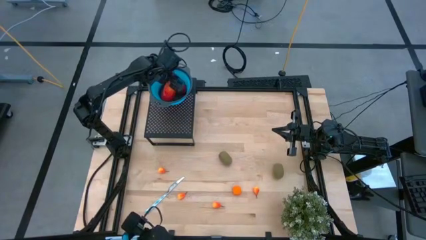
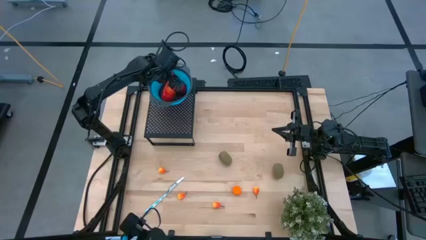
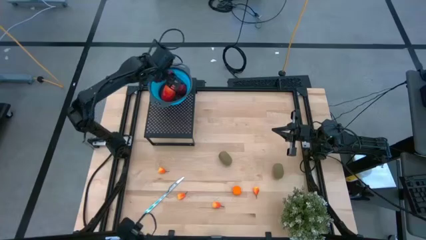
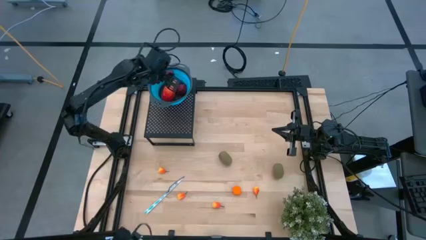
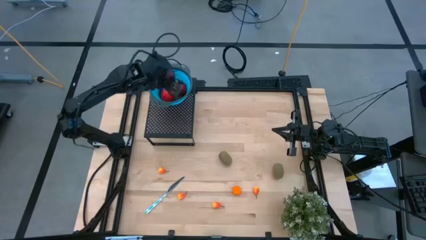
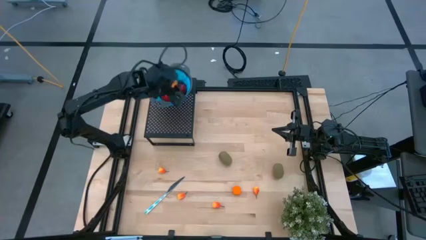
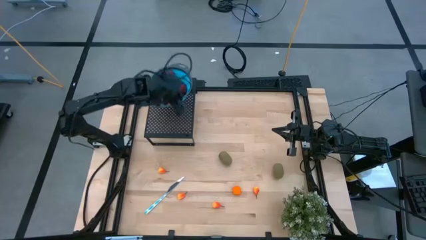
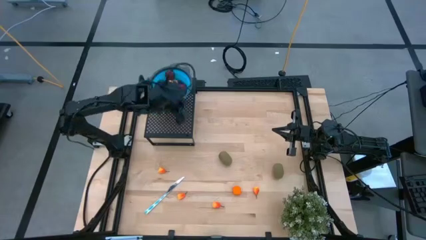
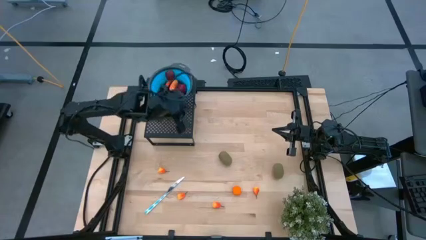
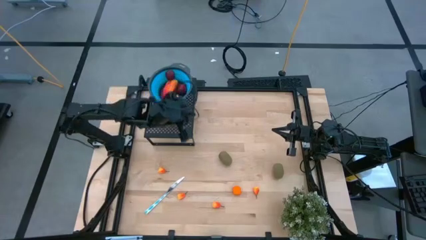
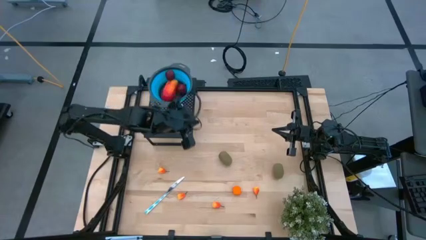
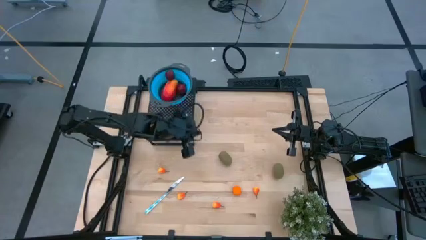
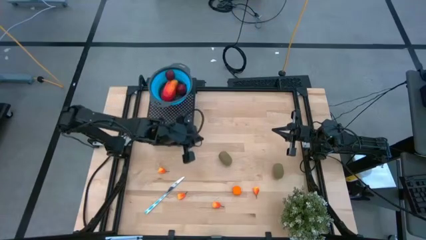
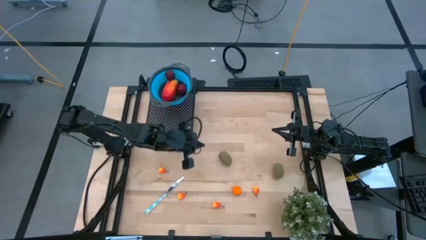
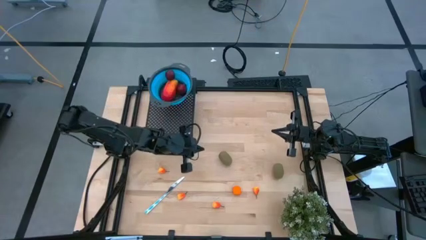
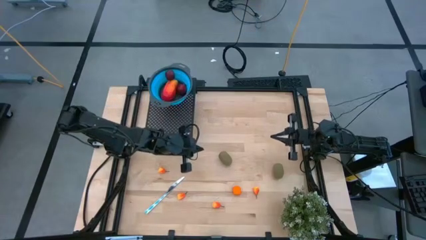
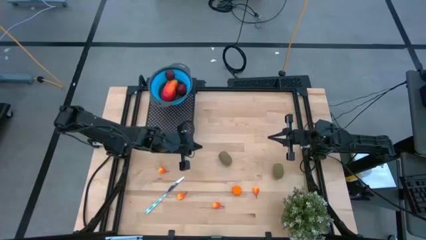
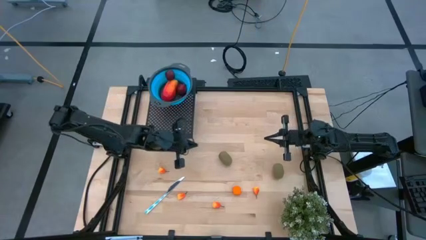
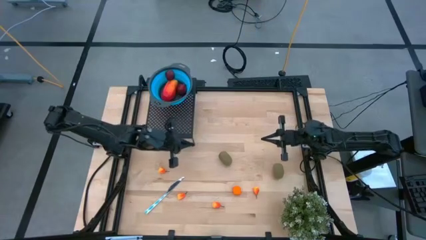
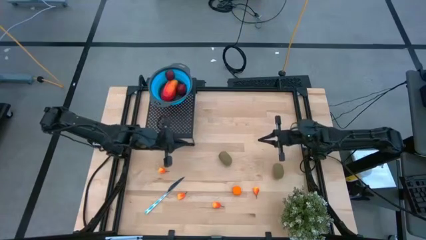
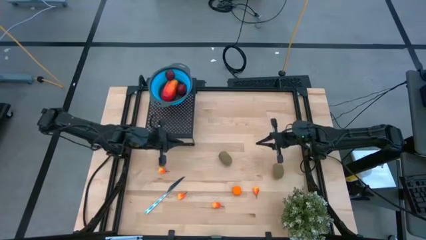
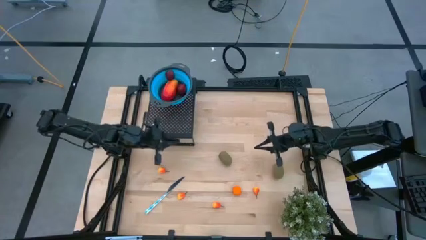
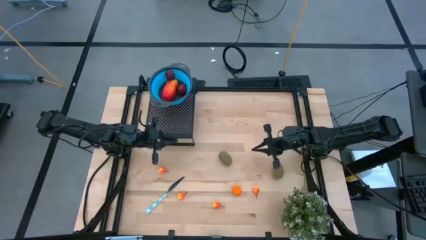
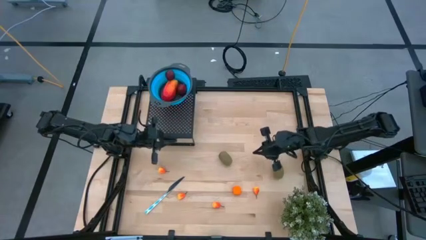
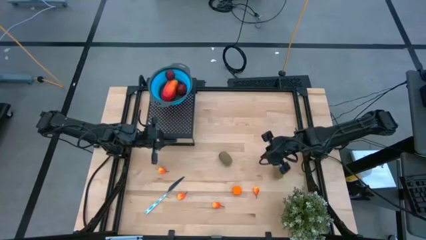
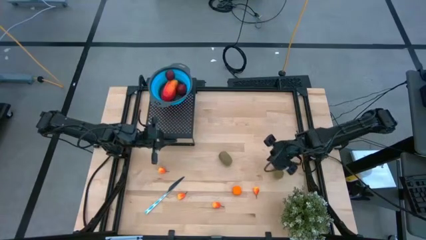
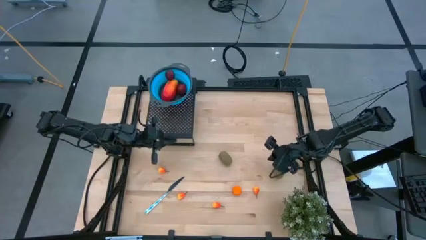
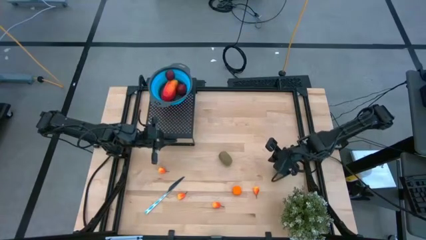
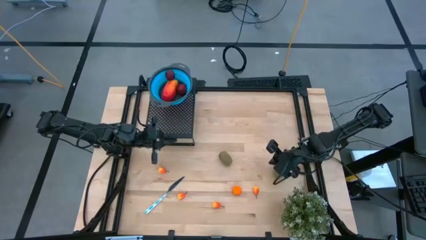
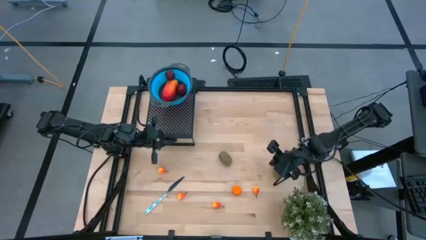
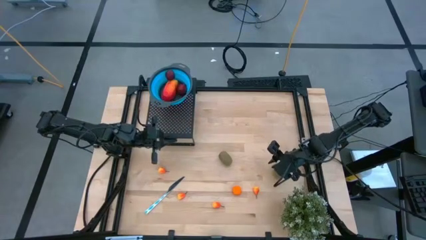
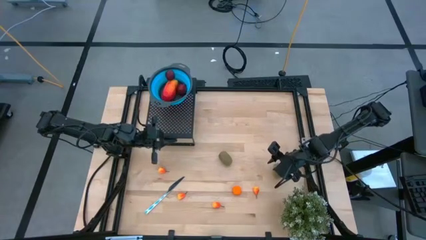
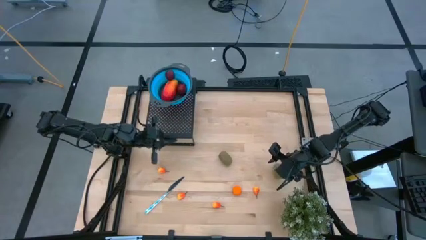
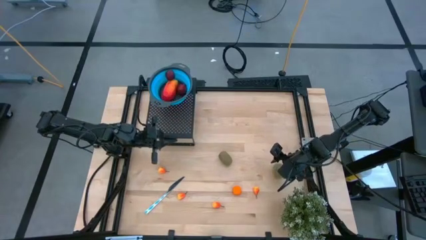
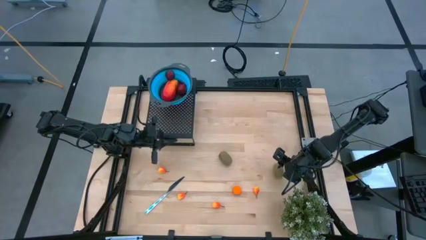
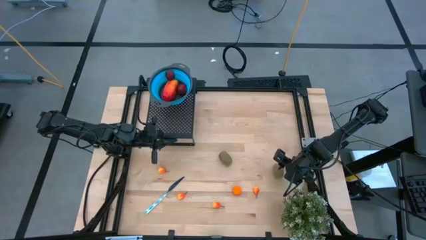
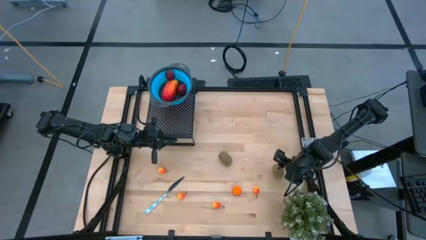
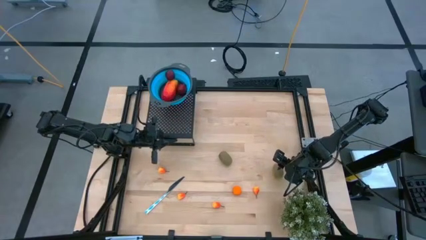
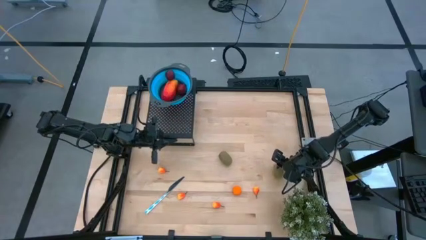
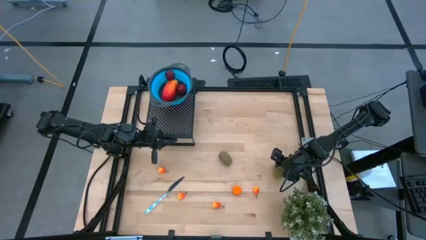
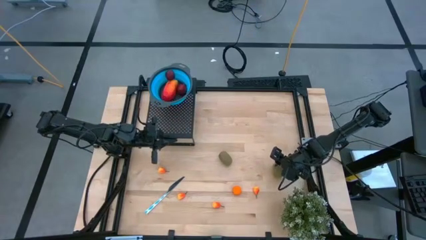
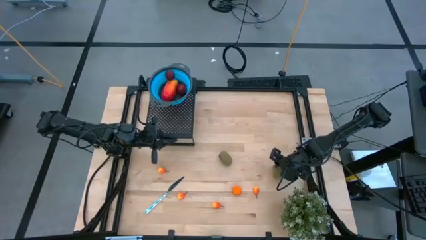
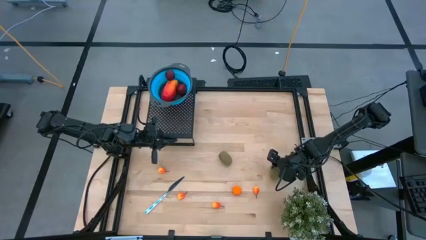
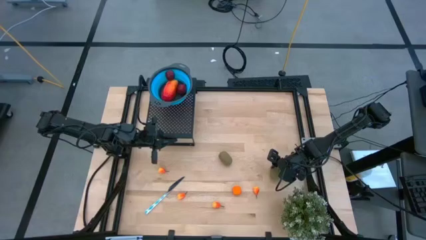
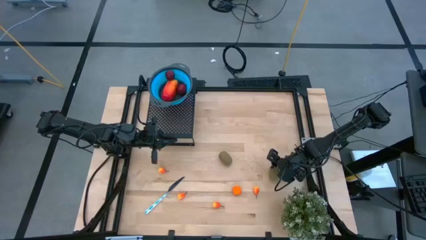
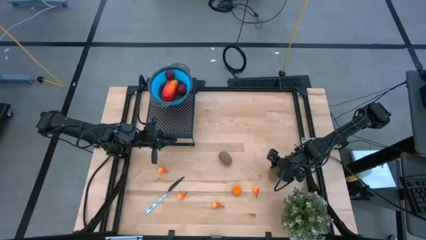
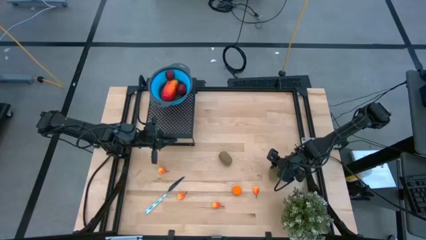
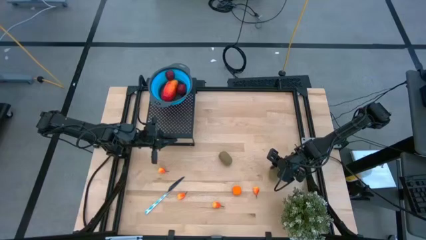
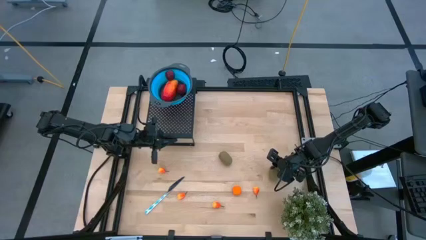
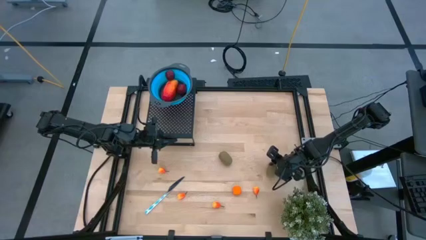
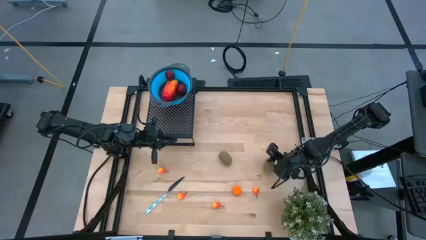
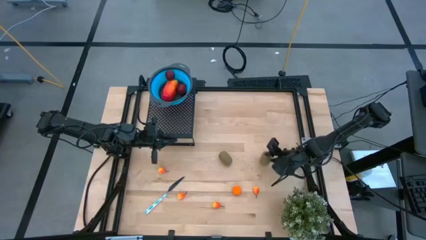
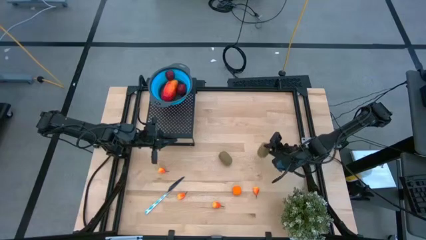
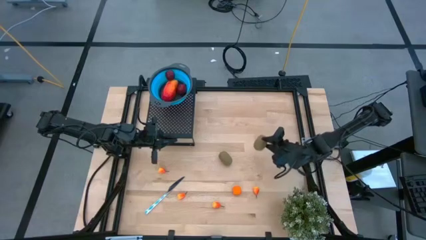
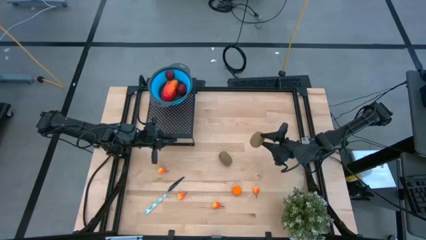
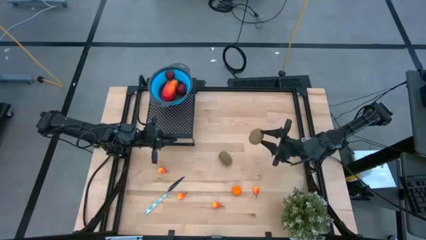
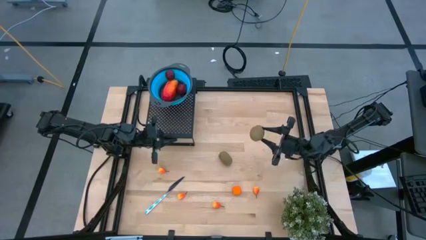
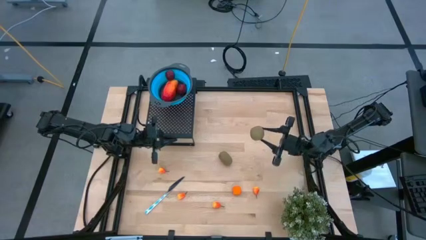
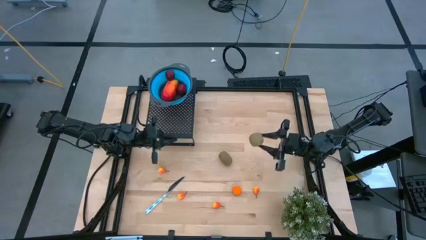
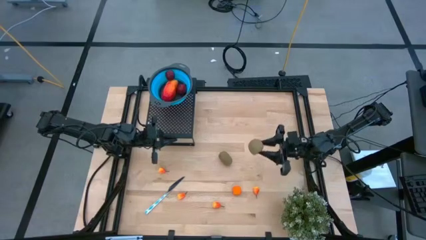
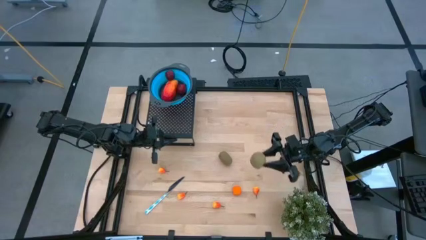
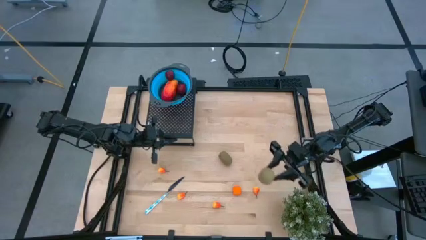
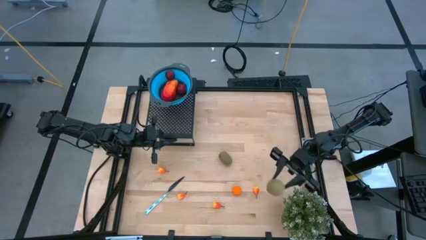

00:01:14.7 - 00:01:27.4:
Task: Pick & Place Fruit
Put the right kiwi into the blue strainer bowl on the shelf

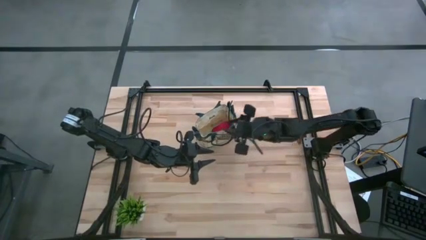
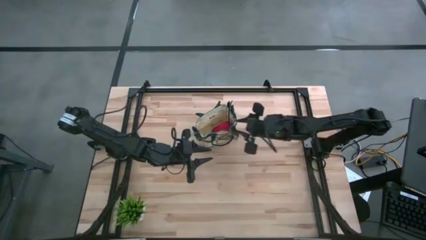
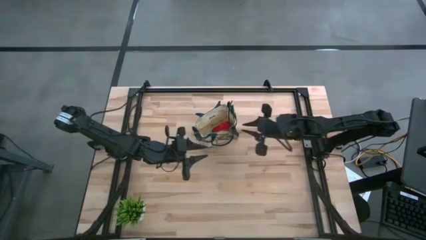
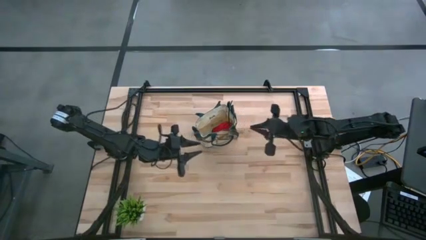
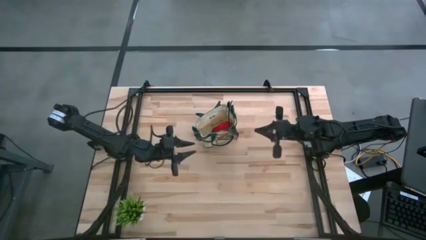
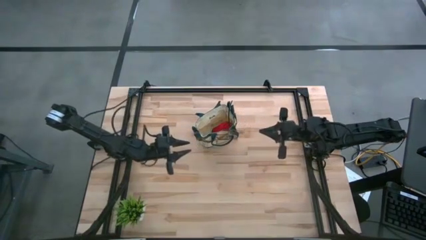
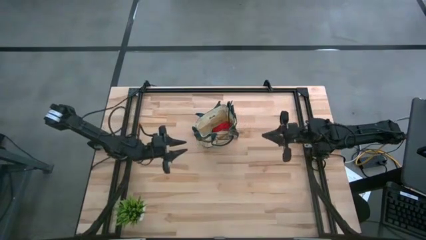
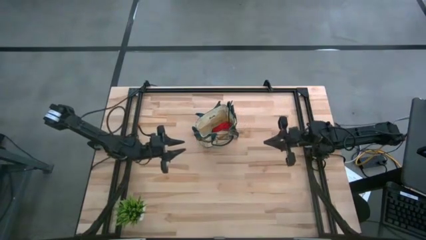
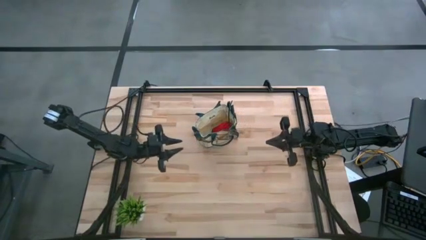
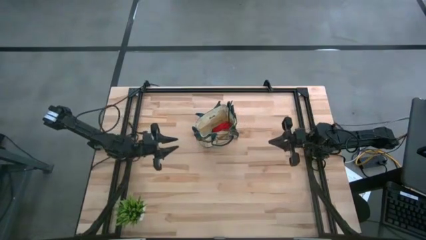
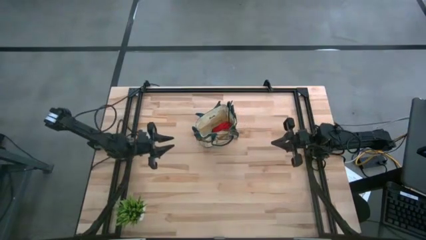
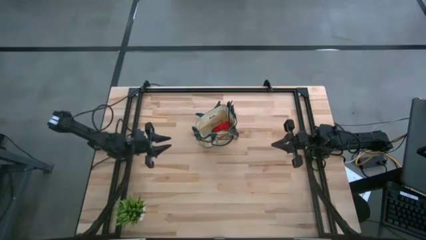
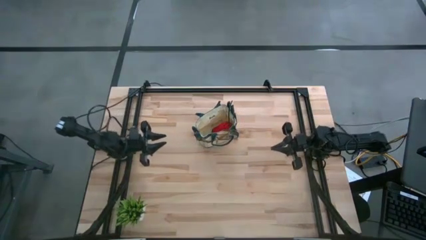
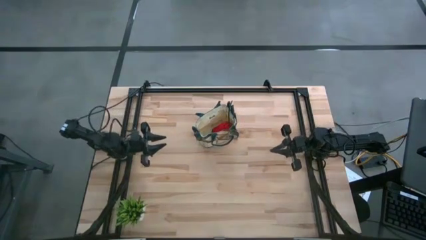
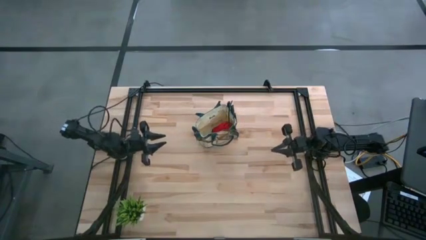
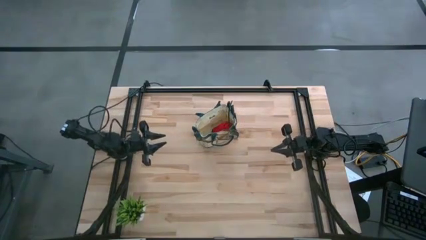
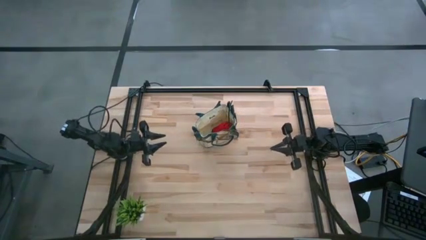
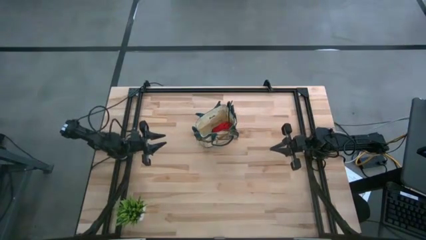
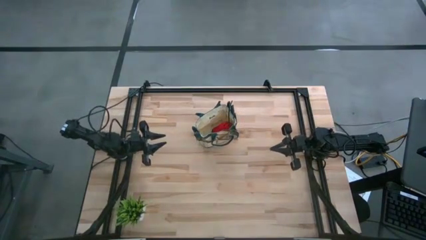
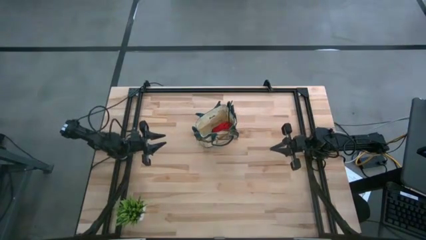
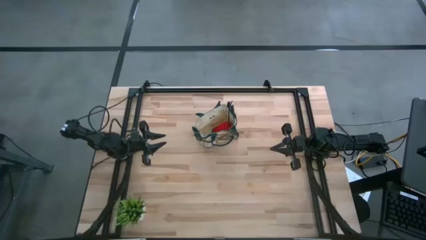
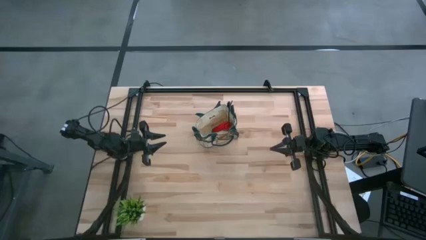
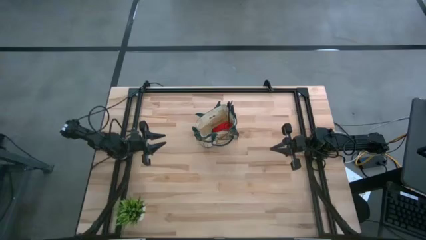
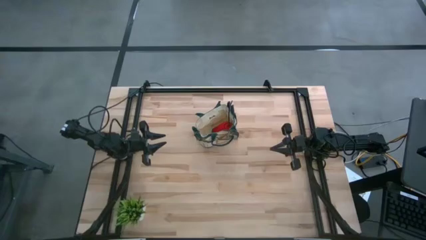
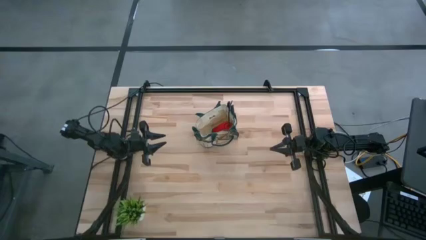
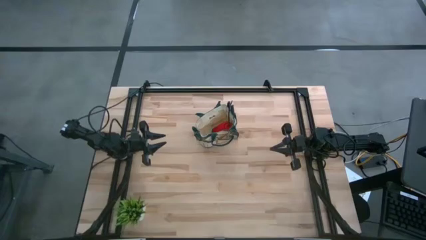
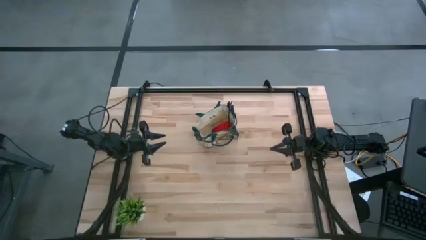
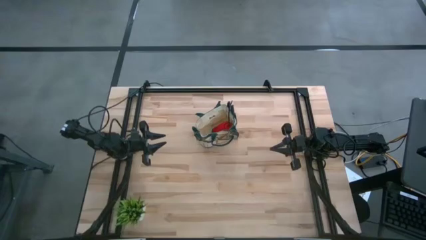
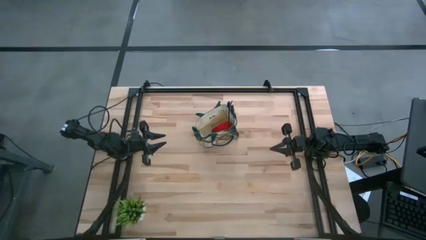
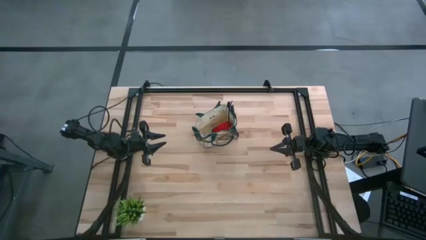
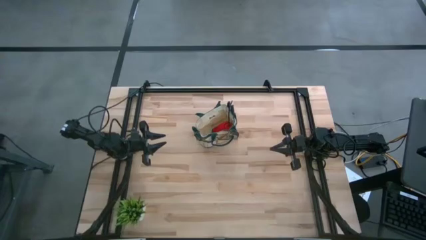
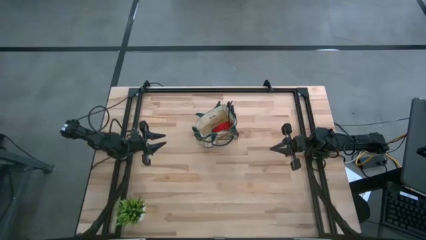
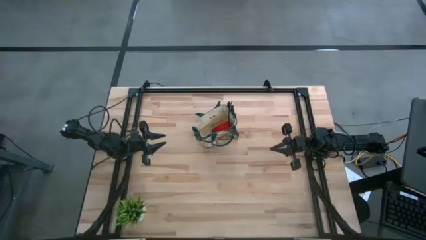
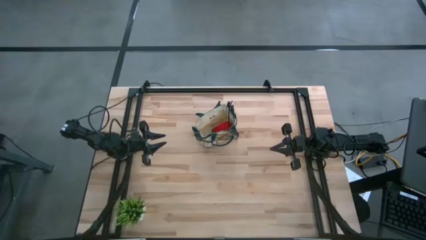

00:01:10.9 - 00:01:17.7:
Task: Pick & Place Garden tools in Gardening bag
Return to Home Position
